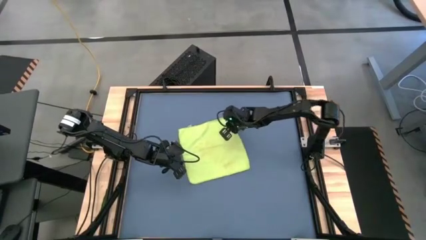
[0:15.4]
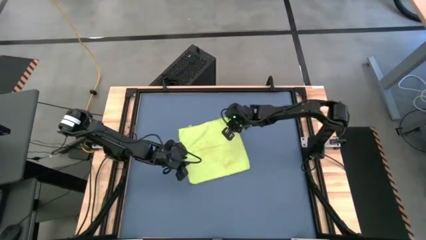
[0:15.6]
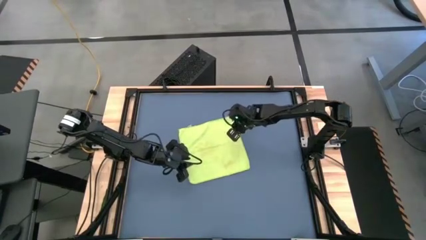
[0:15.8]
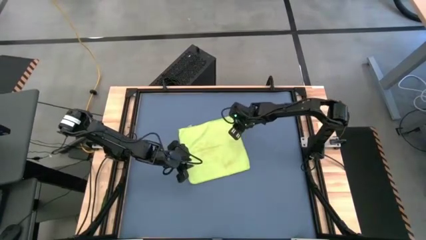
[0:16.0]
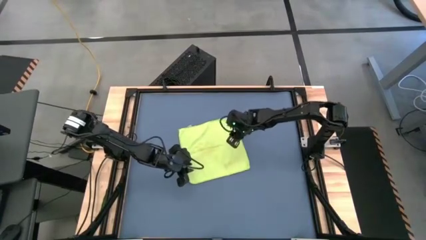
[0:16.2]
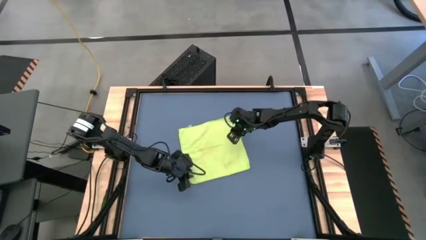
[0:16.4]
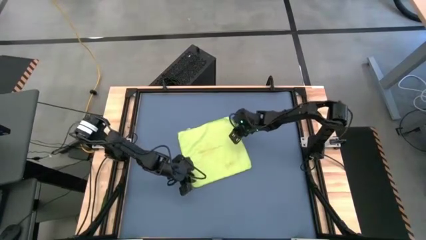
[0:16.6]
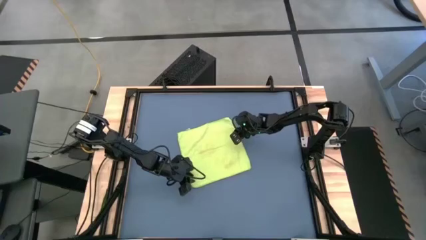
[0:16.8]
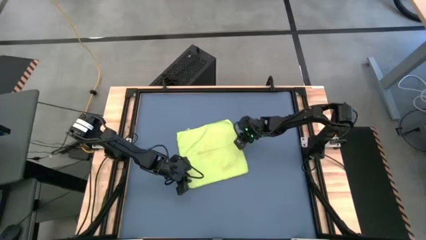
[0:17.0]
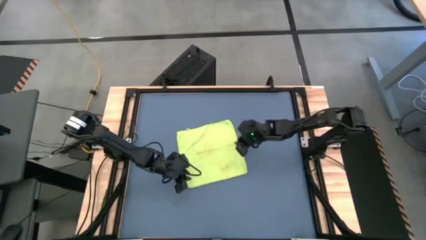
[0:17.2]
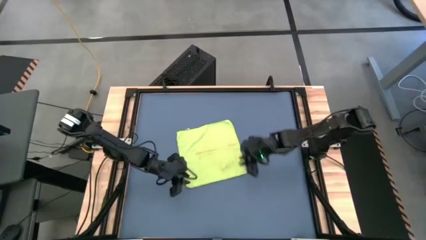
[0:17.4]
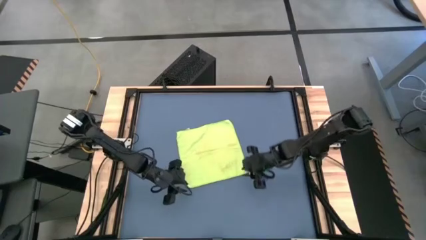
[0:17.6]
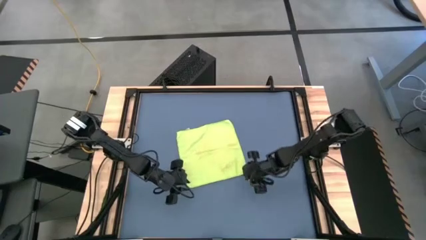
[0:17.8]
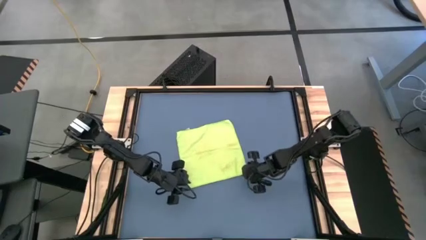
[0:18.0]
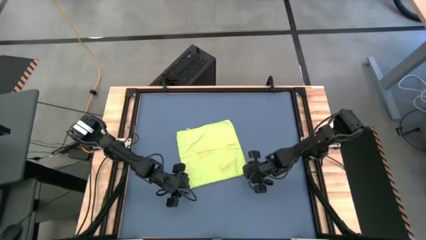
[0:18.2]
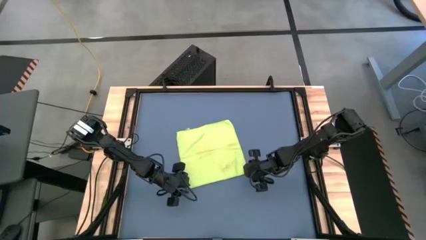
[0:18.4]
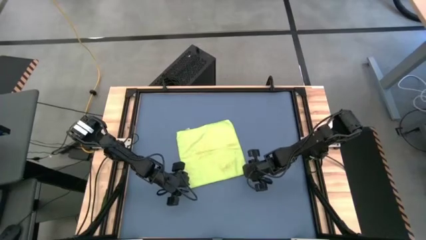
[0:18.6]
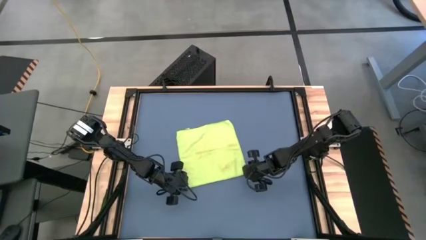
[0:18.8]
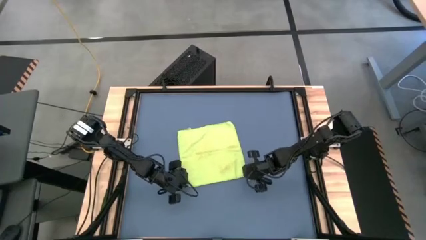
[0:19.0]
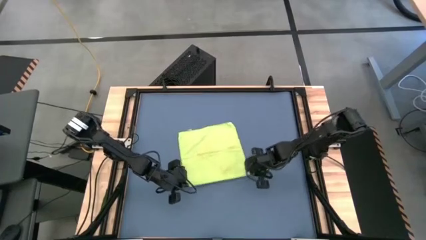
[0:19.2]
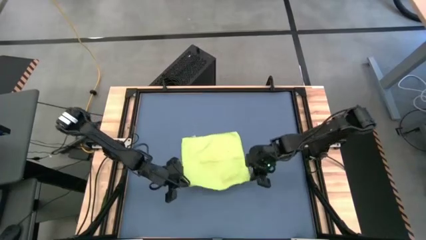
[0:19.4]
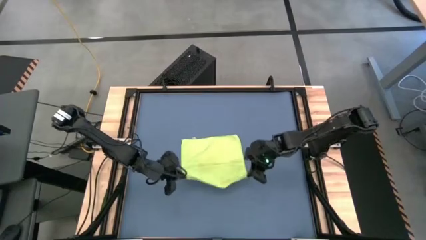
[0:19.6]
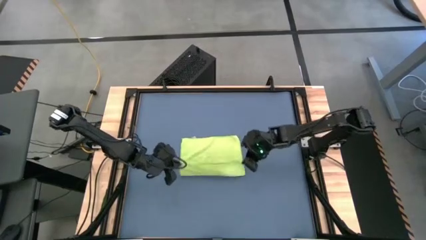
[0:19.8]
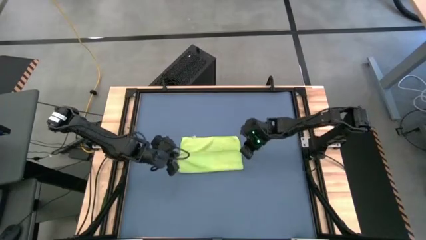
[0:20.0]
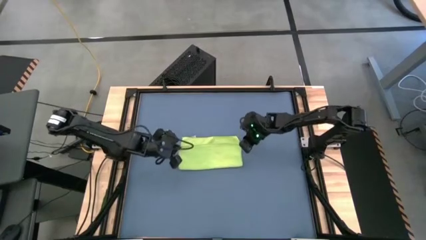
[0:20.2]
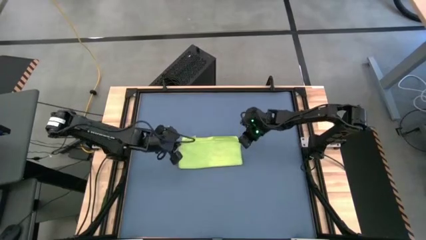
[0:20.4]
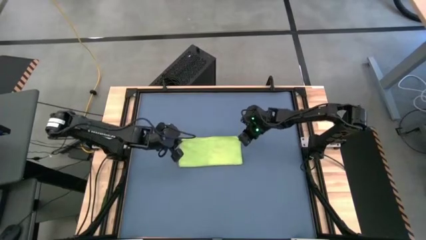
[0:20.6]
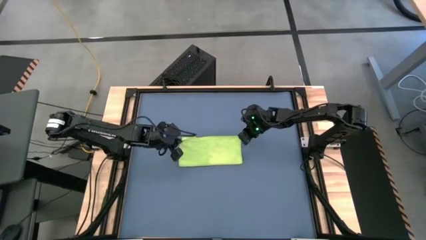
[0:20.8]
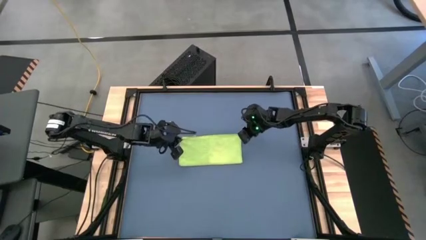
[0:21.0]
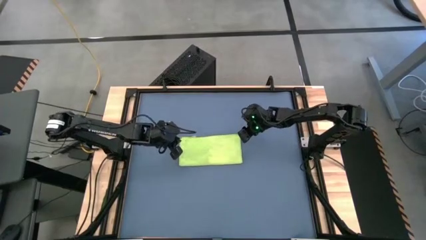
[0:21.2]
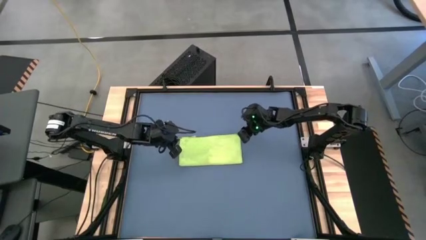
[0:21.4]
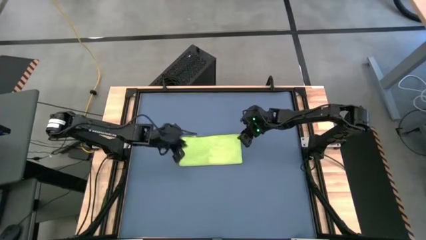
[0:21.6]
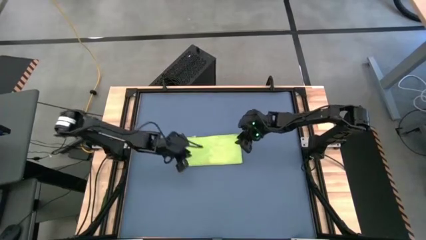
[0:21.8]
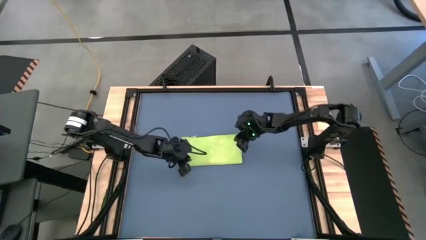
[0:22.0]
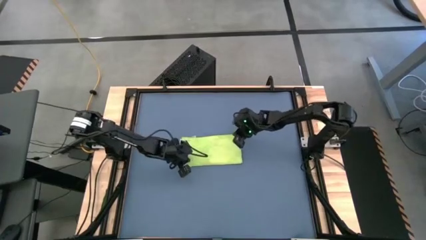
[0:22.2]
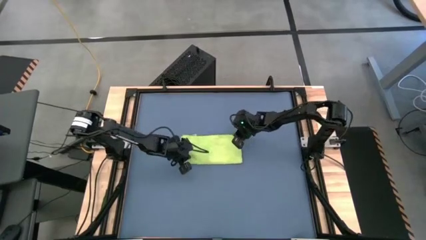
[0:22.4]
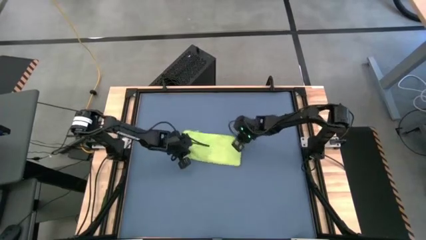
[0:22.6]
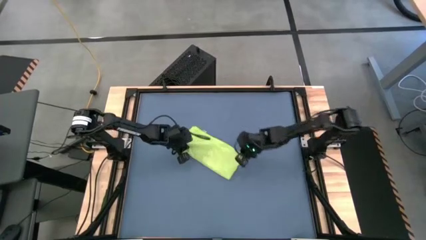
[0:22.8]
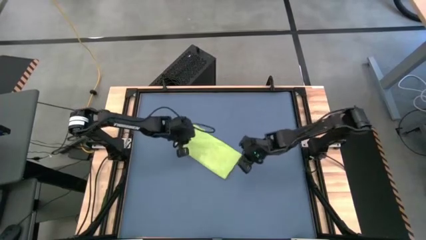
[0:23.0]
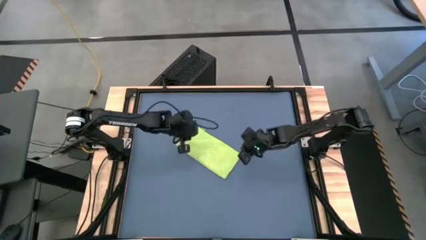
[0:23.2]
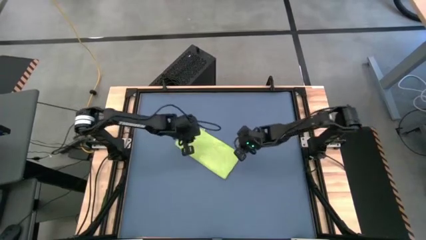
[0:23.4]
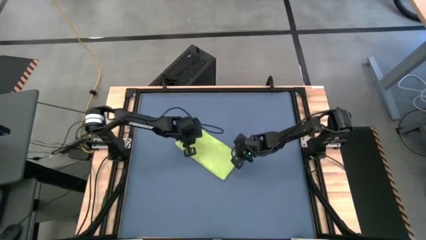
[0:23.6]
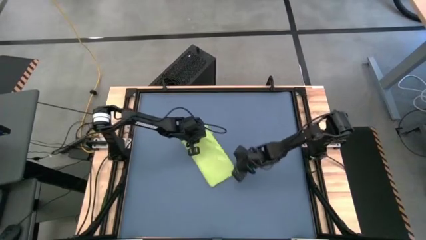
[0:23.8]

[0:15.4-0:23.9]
Task: Roll towel
Fold the green towel
